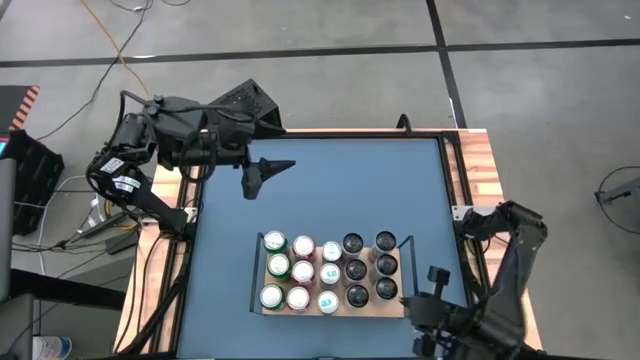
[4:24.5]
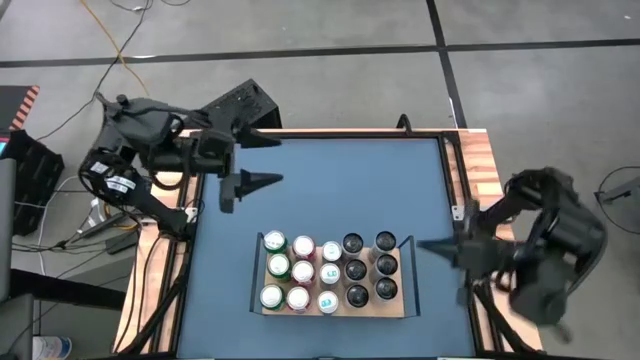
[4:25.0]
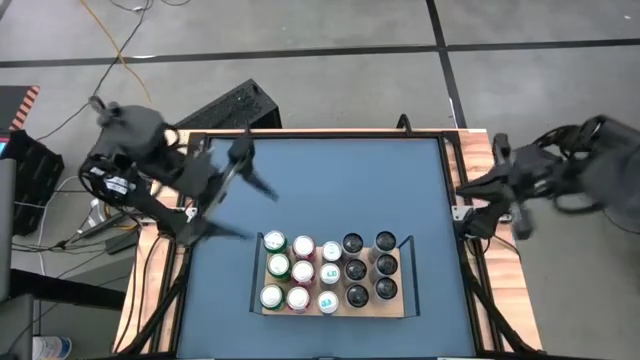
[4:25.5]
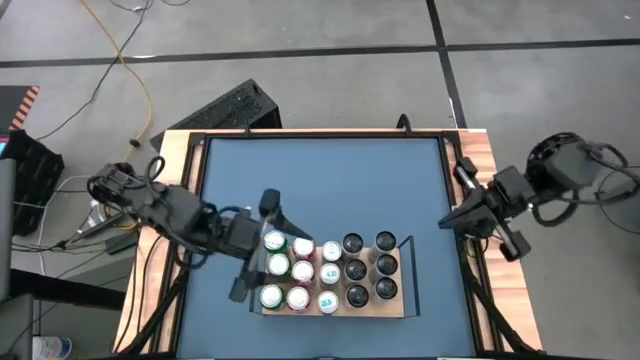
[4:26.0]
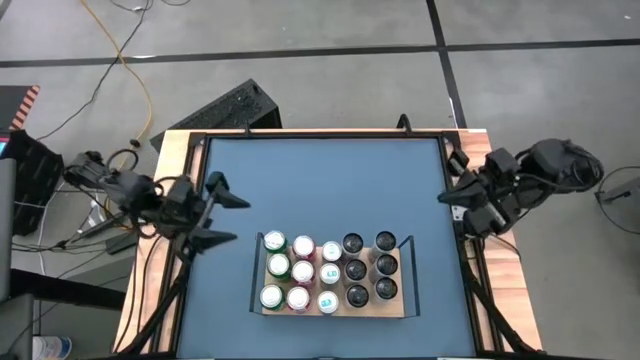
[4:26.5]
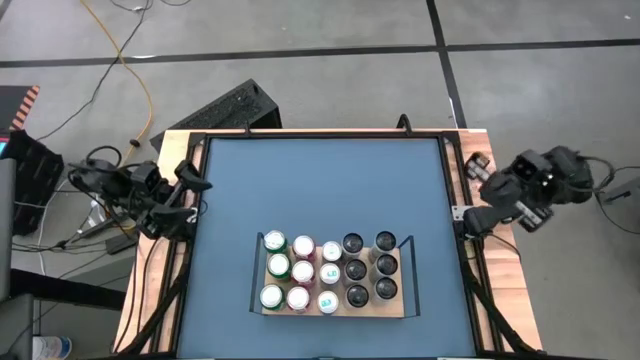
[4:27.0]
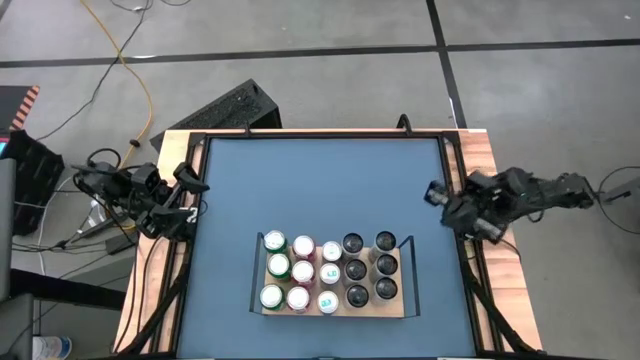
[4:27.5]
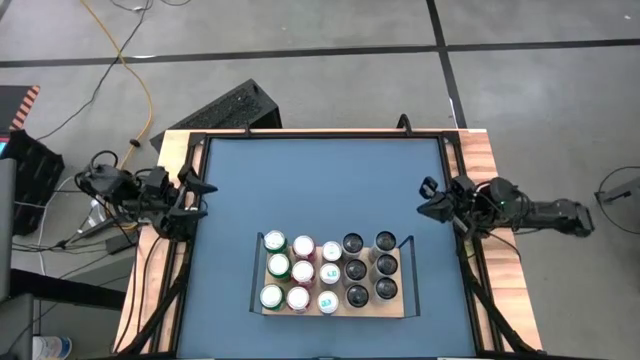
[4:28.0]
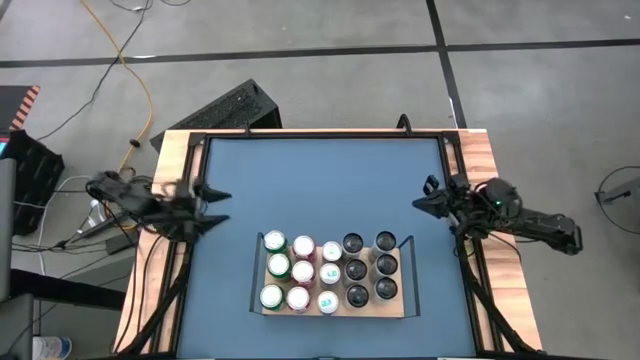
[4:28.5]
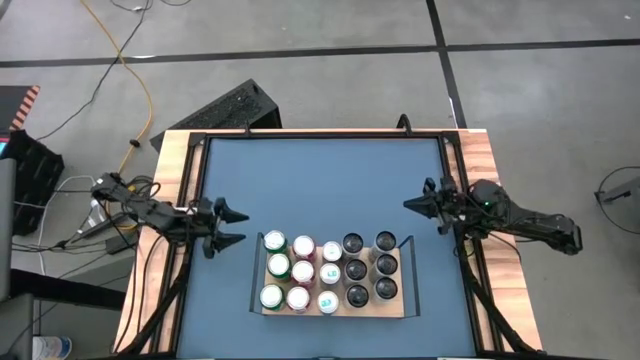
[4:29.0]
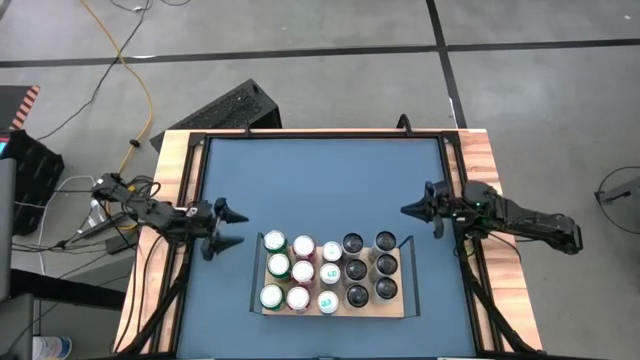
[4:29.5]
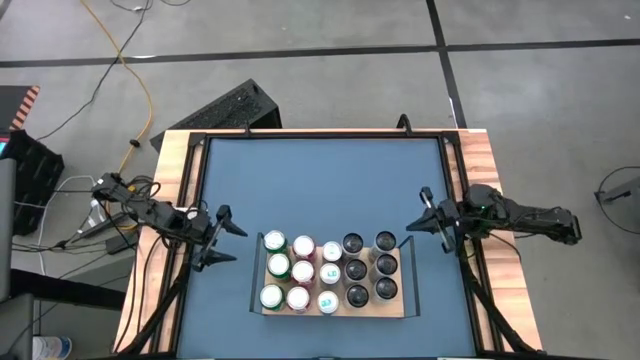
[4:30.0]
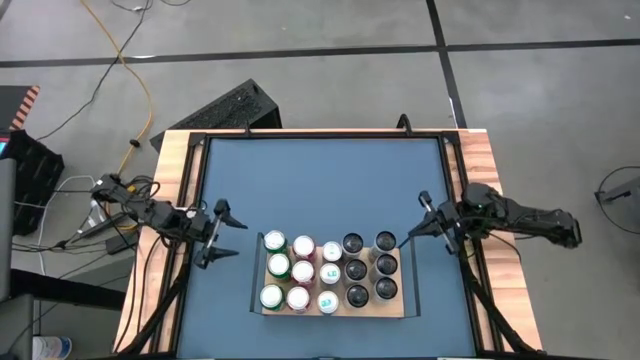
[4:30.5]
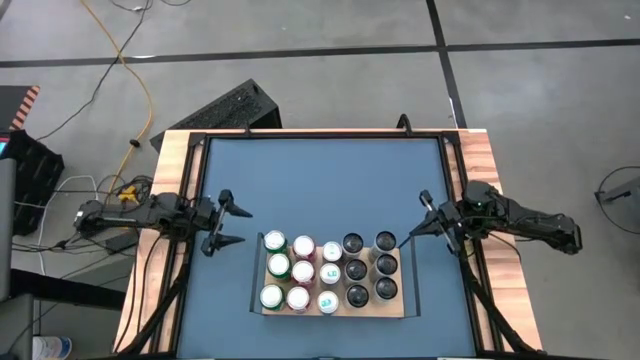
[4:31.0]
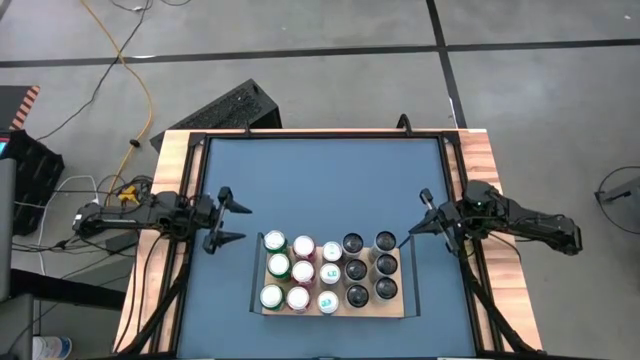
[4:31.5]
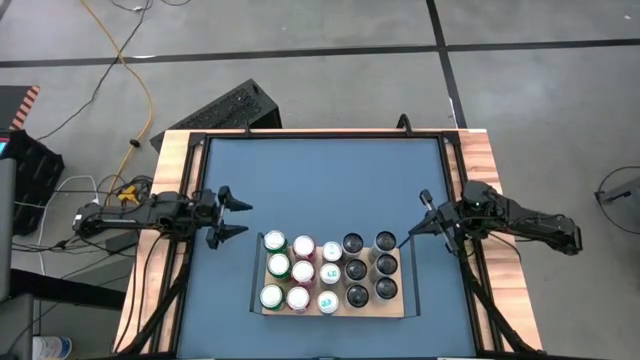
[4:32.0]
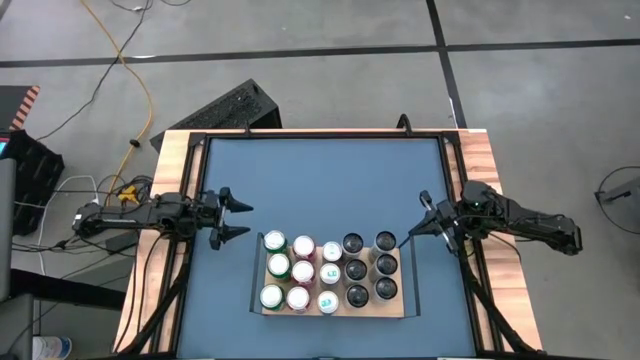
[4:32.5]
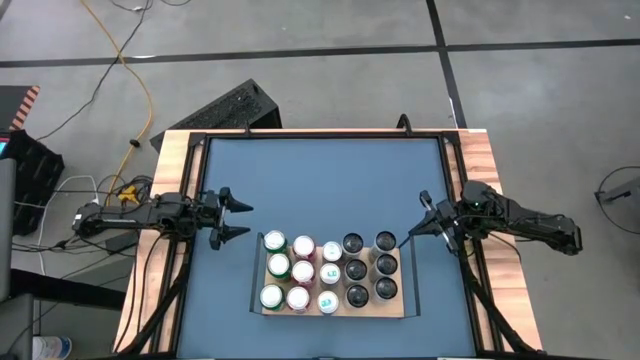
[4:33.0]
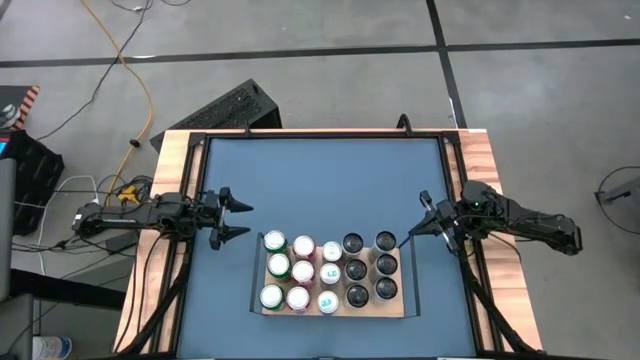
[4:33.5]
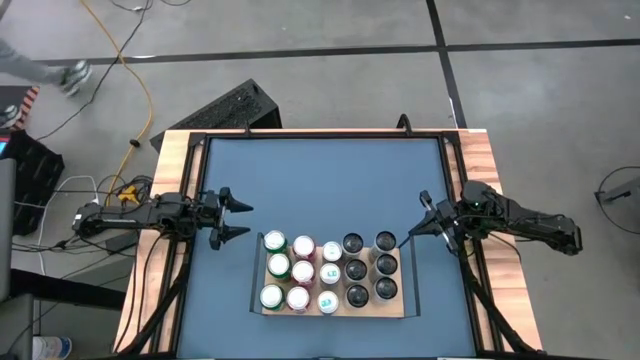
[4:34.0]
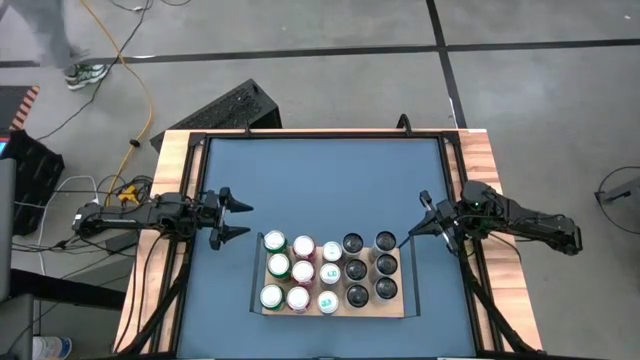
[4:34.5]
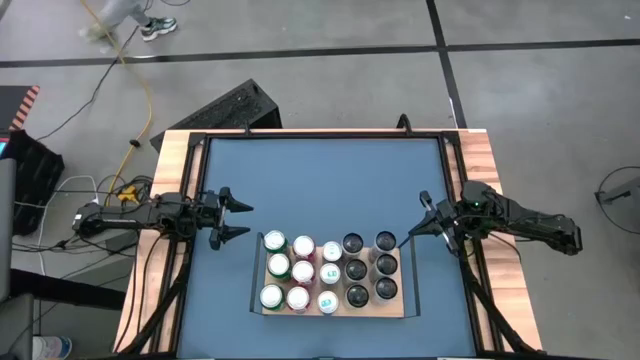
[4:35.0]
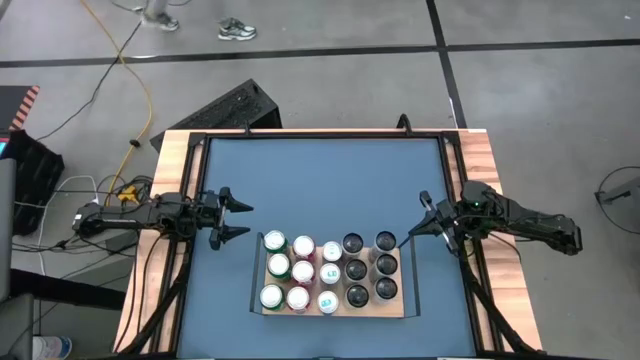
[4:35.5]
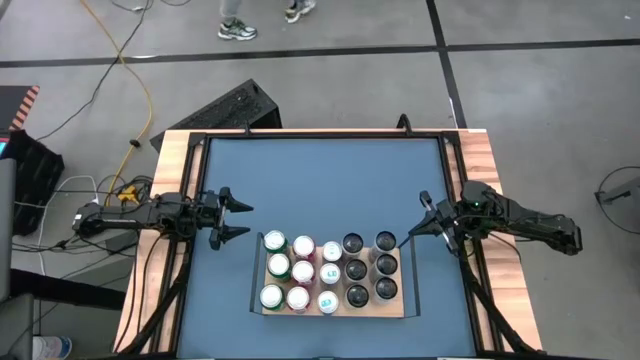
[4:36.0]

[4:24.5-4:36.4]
Task: Place canned beverage on shelf
Return to Home Position

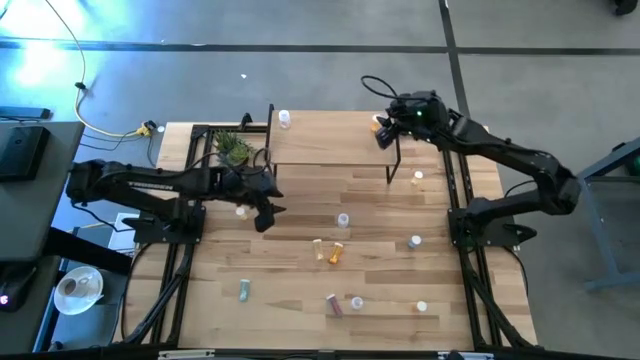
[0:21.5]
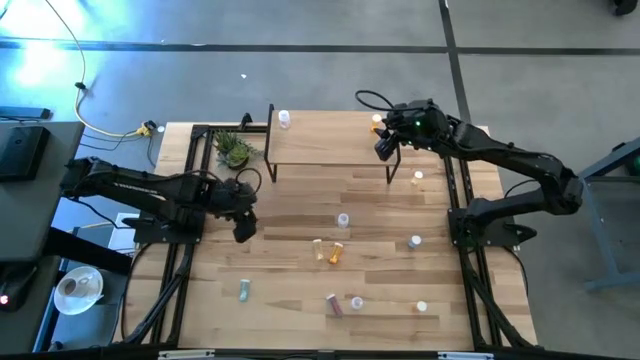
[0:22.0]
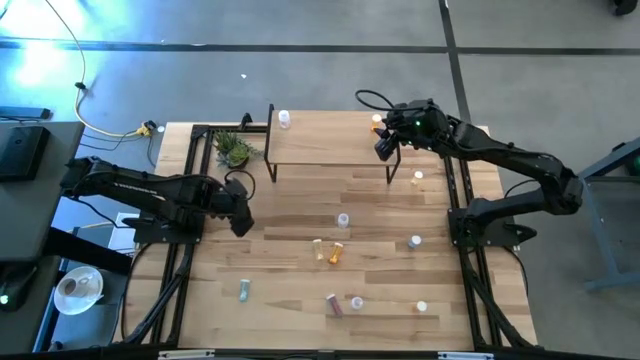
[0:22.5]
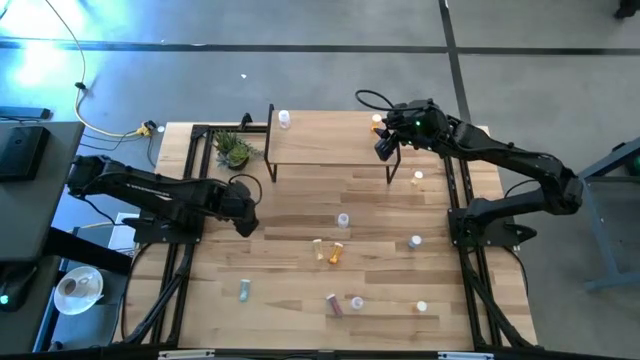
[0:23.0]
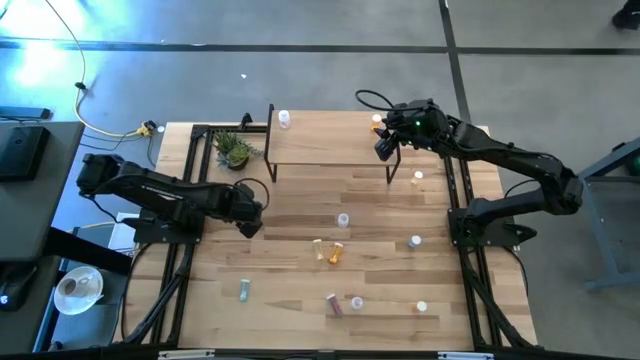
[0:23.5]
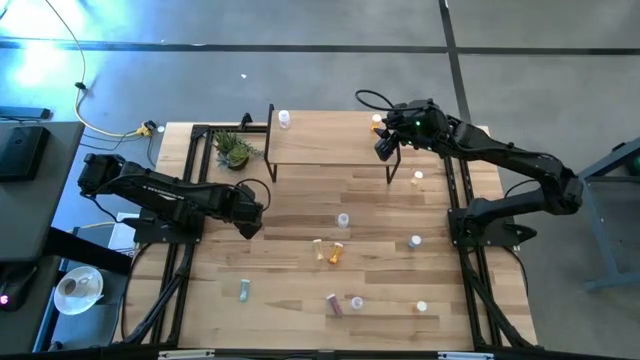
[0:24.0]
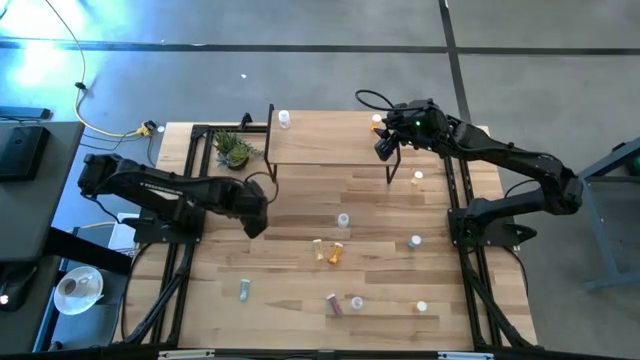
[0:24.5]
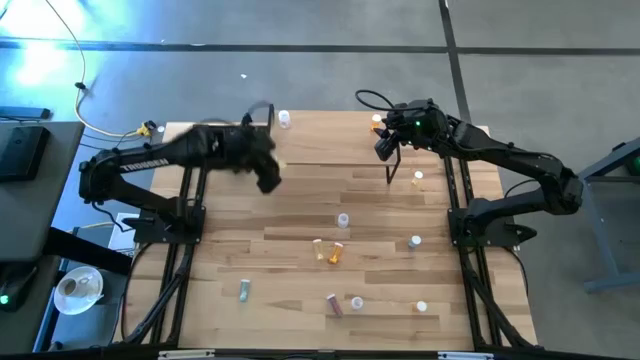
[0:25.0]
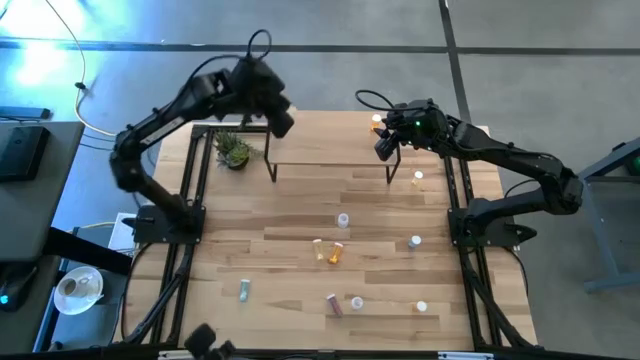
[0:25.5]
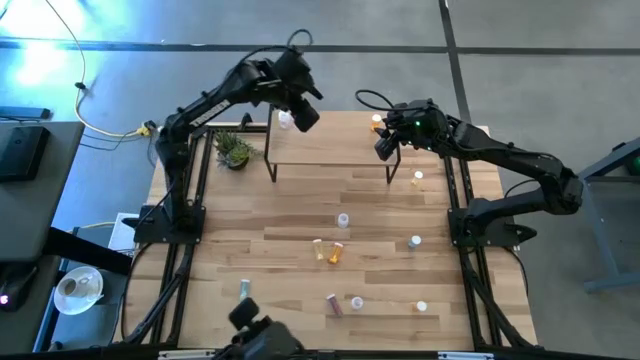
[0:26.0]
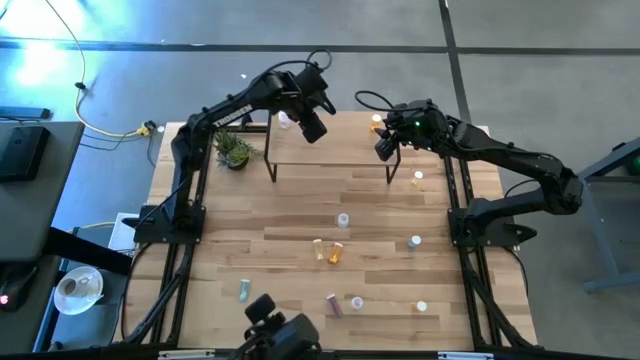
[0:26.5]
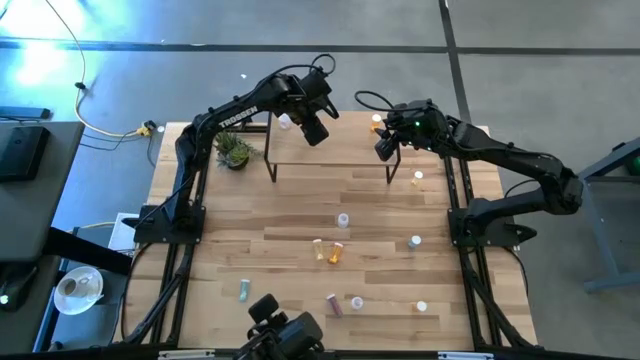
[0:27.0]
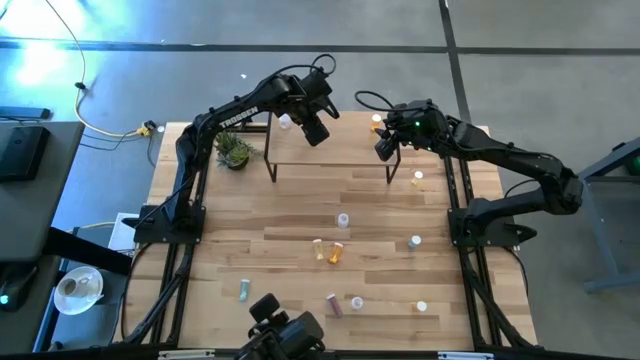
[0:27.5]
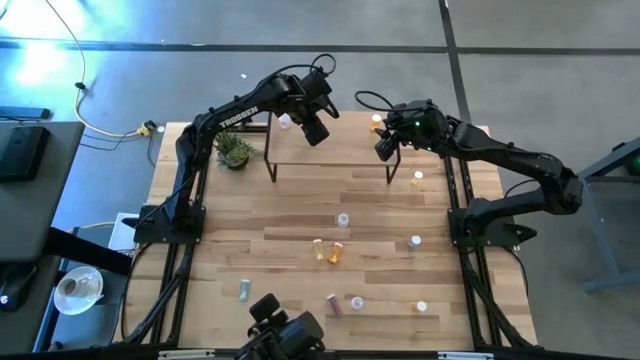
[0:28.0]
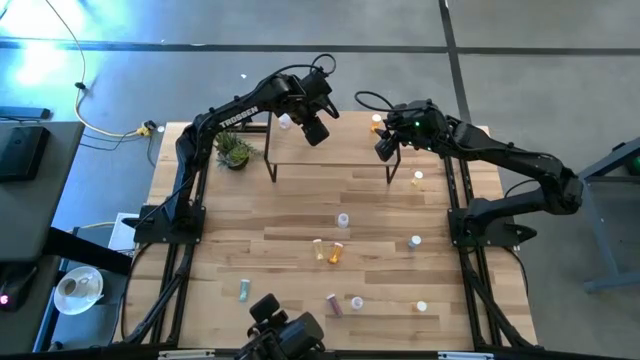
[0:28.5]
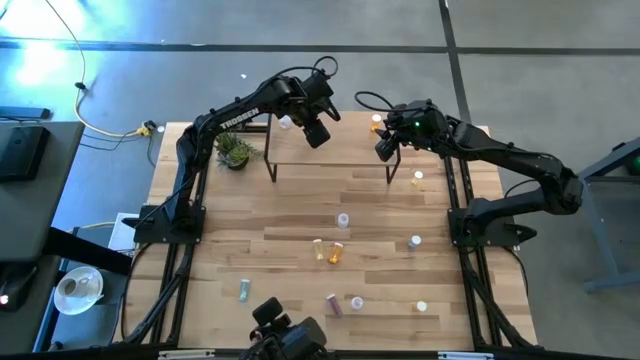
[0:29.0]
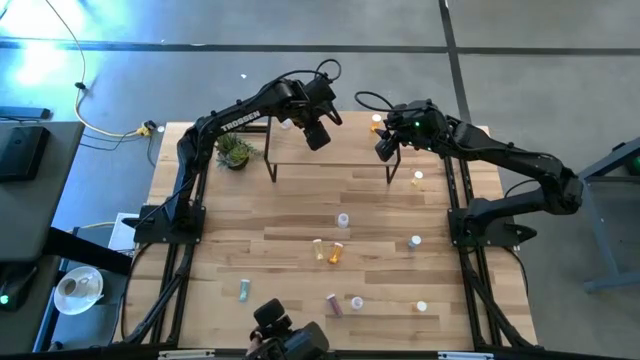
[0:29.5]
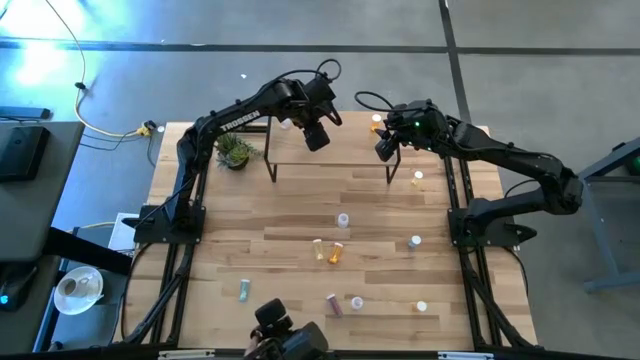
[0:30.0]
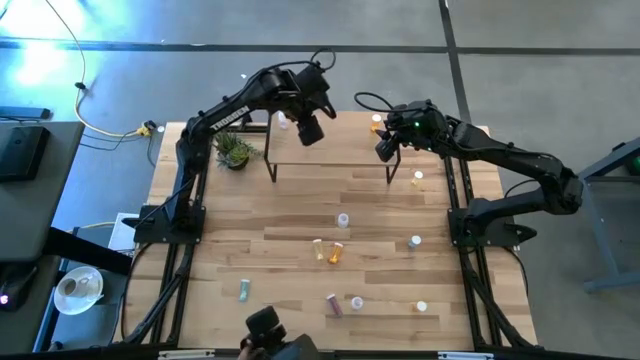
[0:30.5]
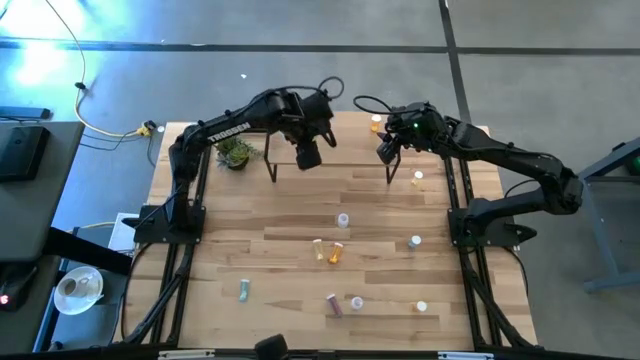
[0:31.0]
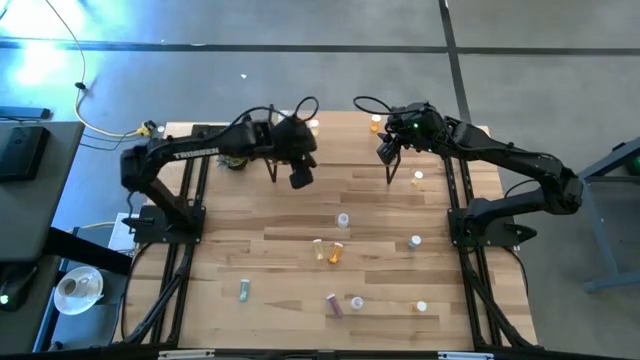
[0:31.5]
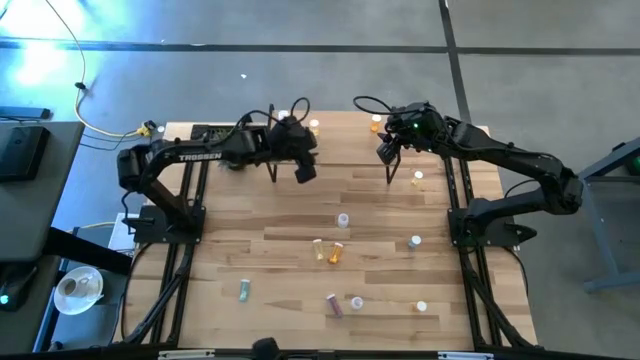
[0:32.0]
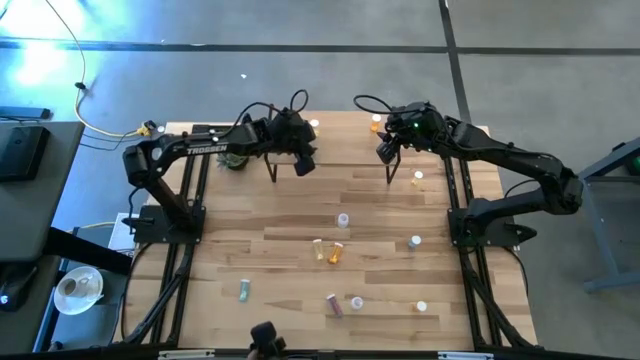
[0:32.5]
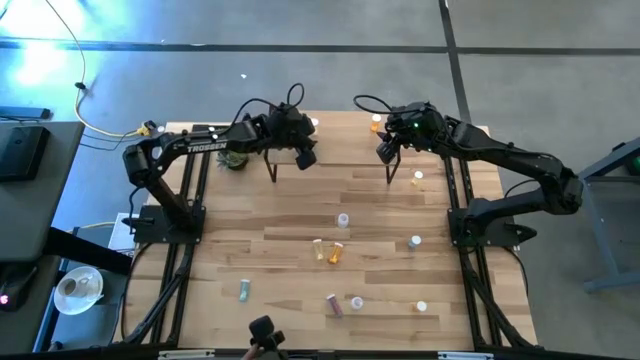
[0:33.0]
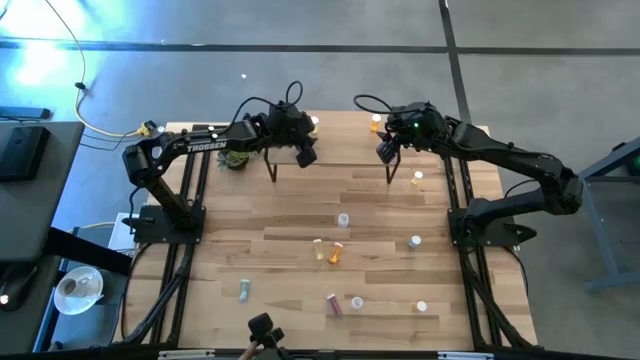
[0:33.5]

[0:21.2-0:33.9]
Task: Pick and place medicine bottles onto shelf by color
Put the yellow pill bottle on the shelf
